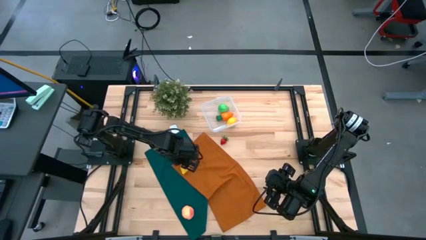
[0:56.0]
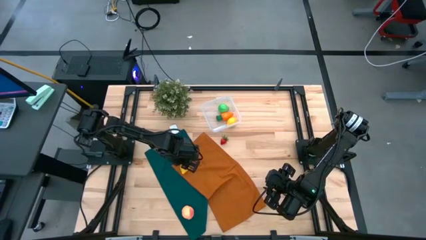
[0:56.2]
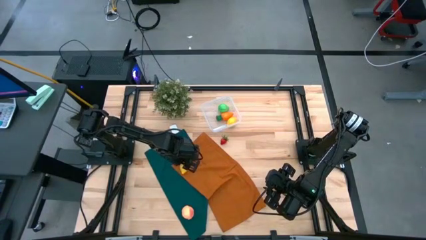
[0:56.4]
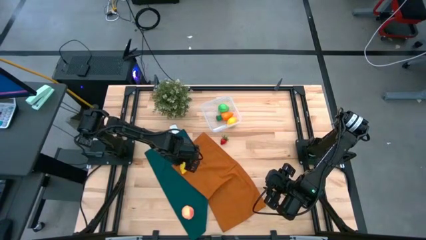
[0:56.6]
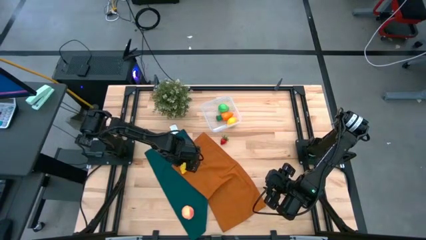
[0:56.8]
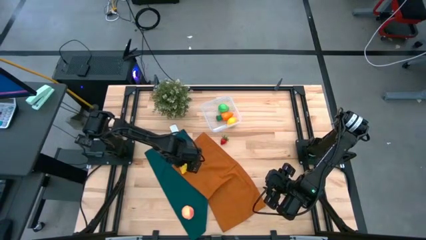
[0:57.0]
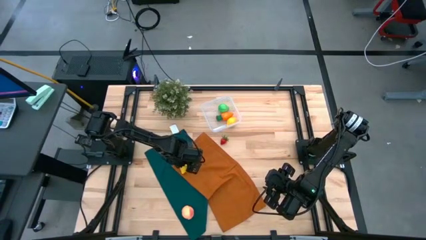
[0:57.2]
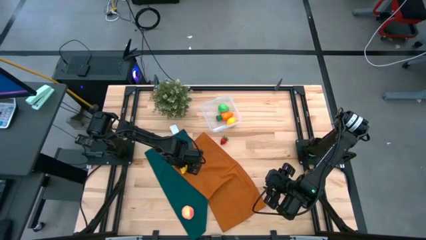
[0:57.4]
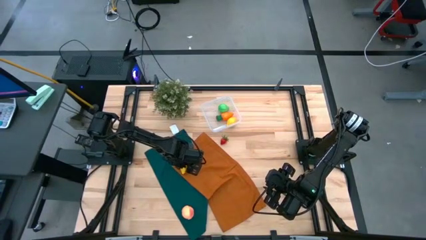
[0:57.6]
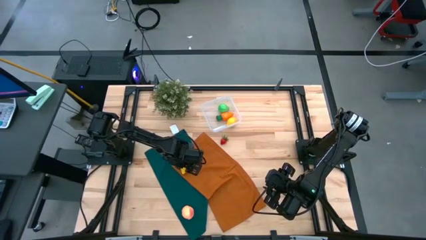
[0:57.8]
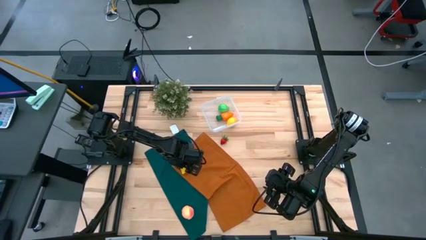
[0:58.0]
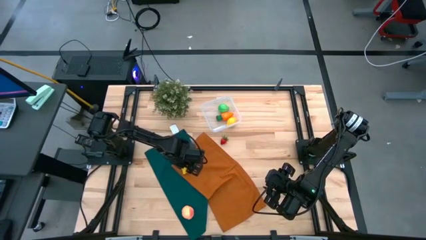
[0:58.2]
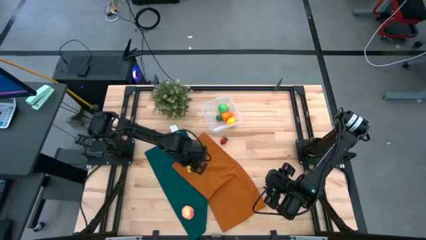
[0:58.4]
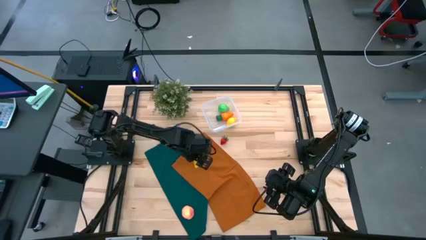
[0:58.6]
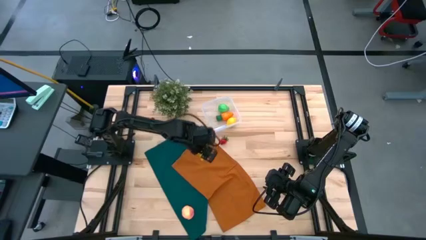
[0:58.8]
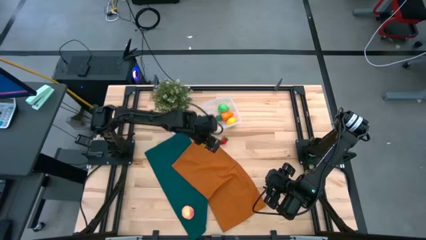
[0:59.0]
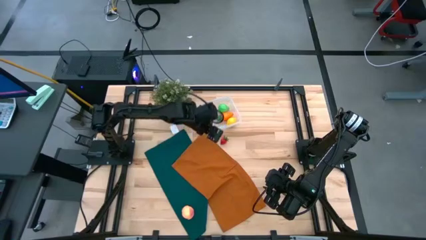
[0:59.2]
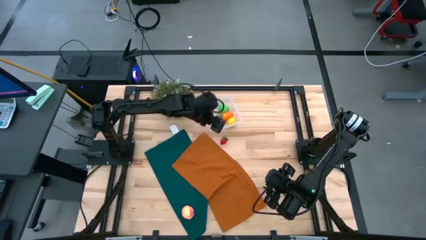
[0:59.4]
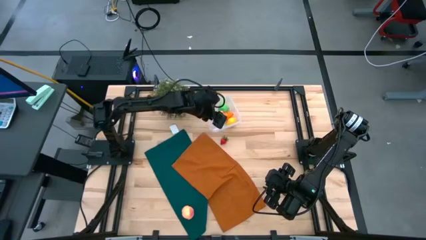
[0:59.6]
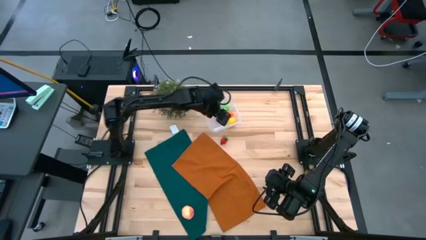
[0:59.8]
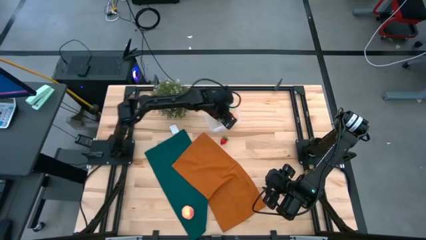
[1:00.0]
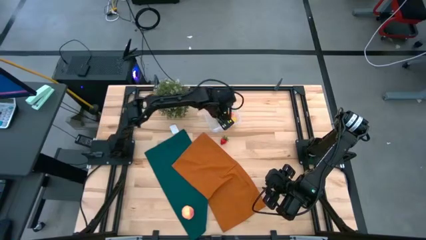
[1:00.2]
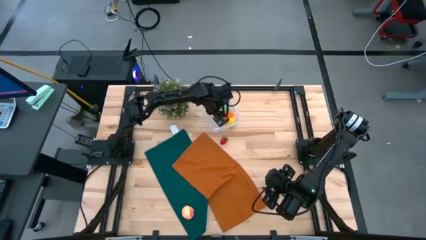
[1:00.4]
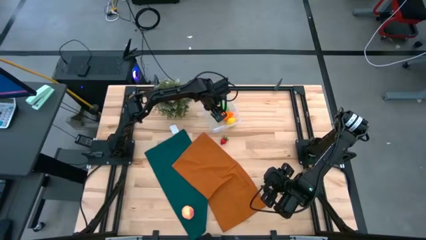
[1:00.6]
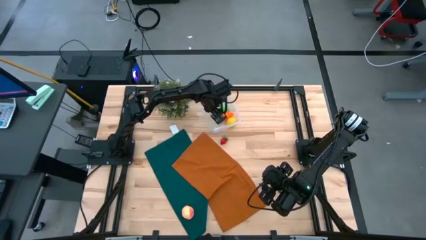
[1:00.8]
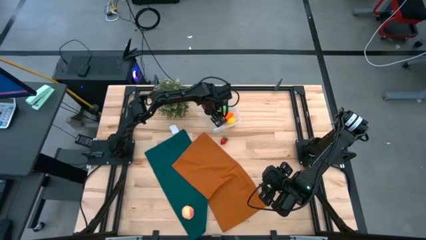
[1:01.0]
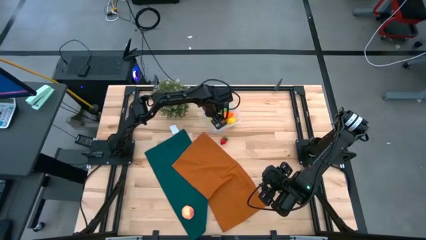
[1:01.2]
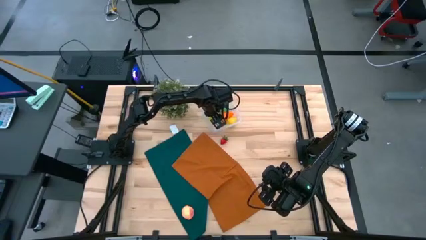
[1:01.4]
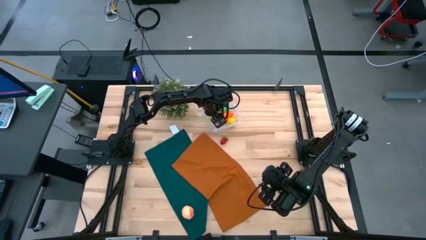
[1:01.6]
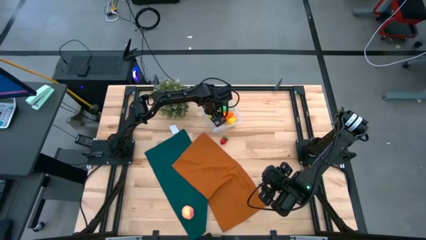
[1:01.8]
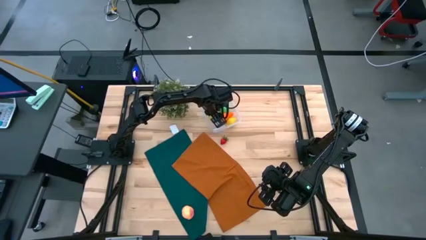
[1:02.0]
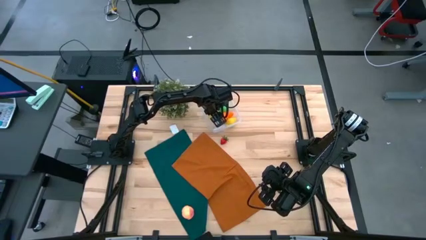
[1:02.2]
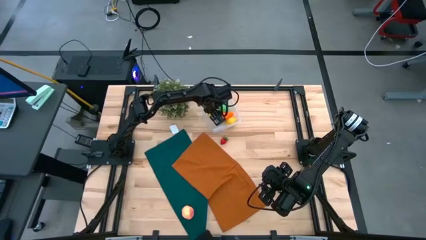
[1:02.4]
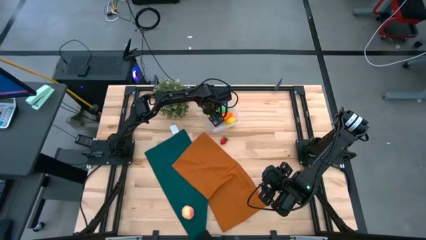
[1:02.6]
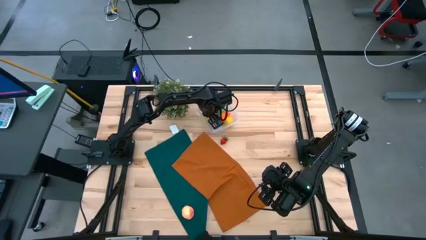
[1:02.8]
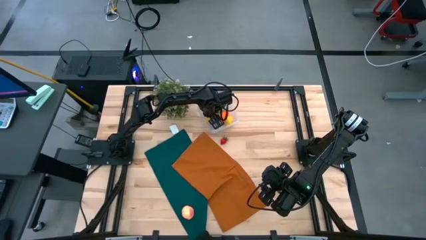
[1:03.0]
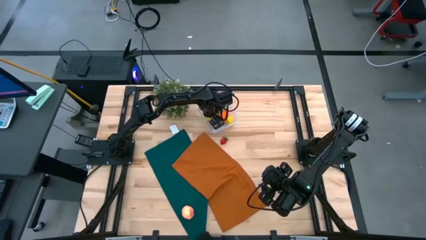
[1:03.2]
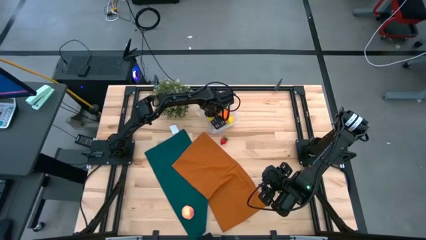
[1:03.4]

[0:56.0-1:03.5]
Task: Pick and placing Produce into tupperware
Put the yellow lemon into the transparent bin

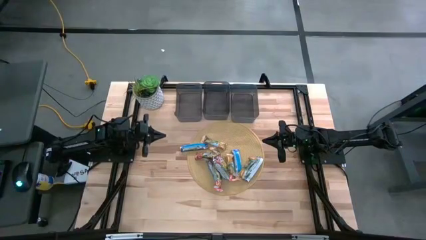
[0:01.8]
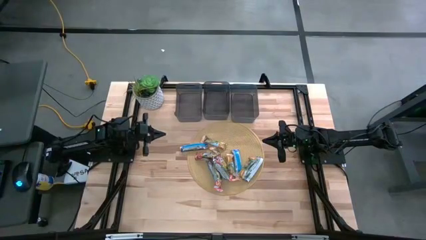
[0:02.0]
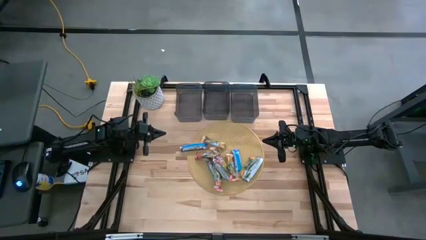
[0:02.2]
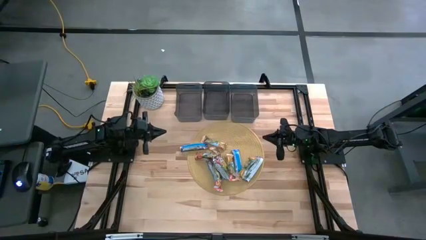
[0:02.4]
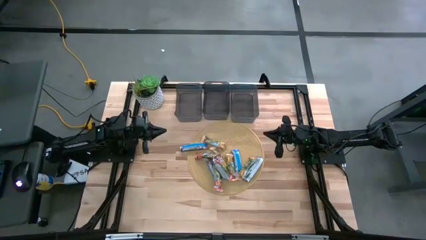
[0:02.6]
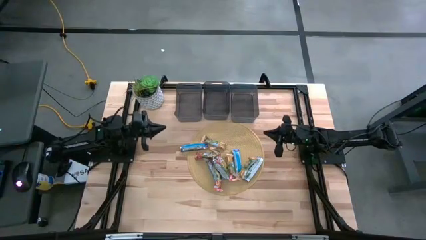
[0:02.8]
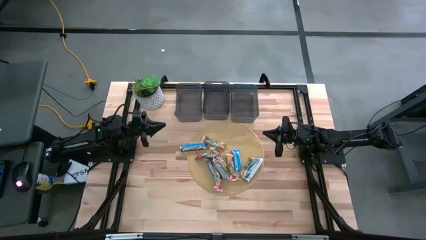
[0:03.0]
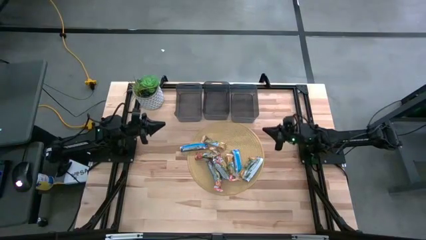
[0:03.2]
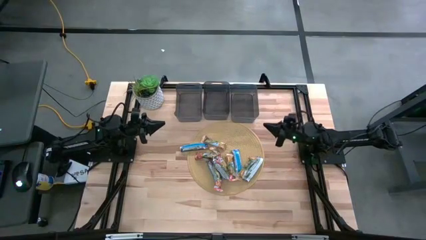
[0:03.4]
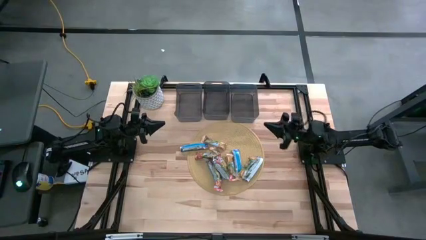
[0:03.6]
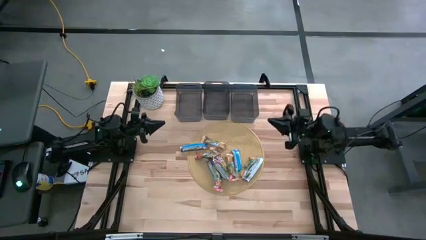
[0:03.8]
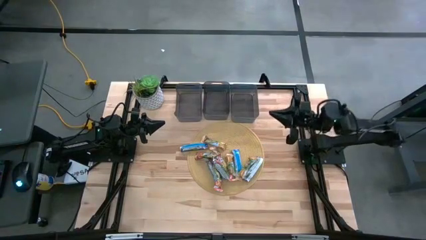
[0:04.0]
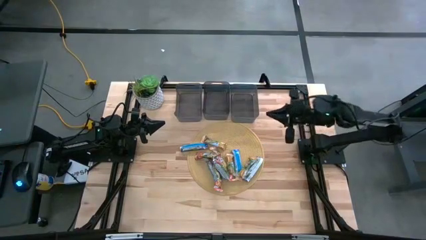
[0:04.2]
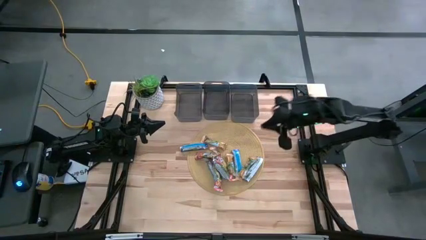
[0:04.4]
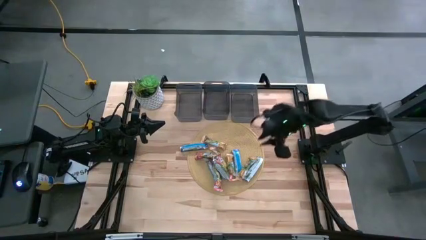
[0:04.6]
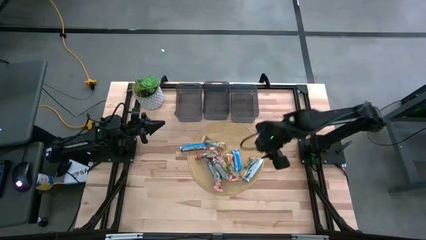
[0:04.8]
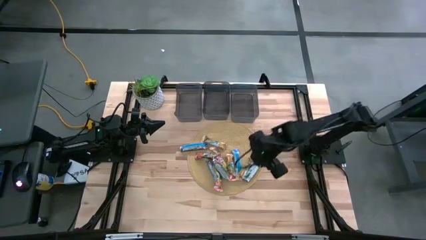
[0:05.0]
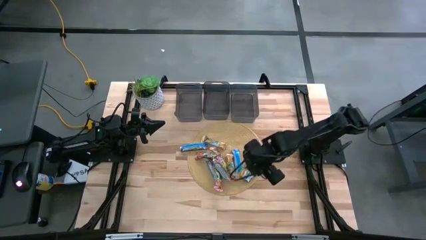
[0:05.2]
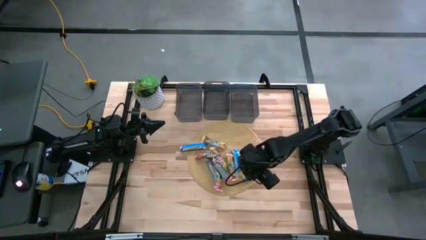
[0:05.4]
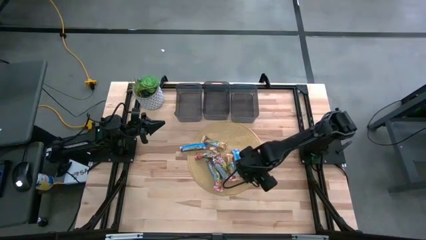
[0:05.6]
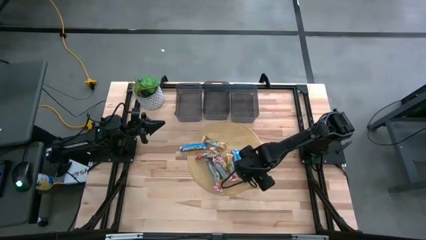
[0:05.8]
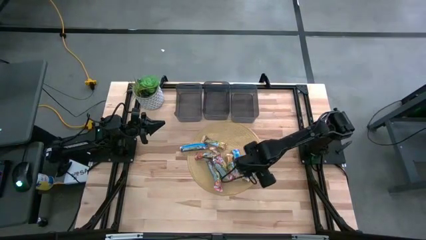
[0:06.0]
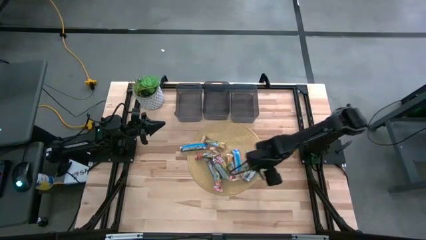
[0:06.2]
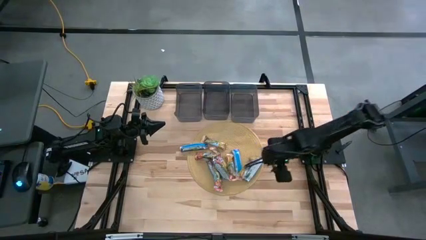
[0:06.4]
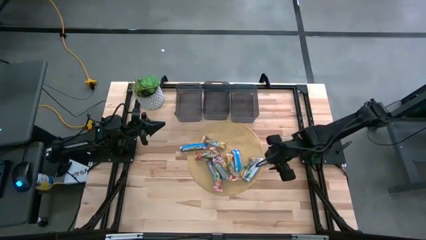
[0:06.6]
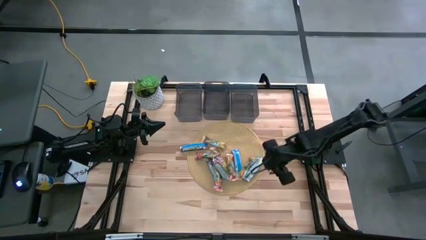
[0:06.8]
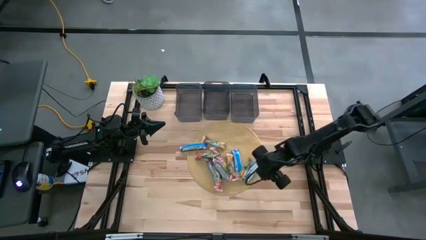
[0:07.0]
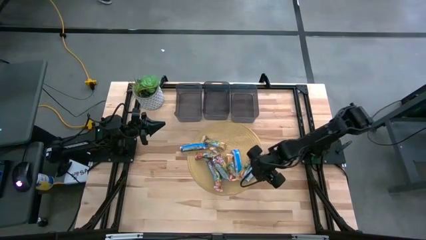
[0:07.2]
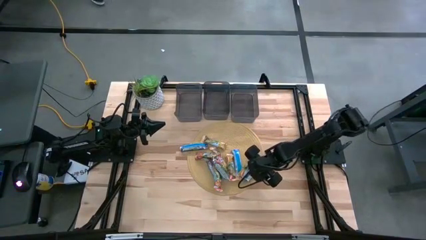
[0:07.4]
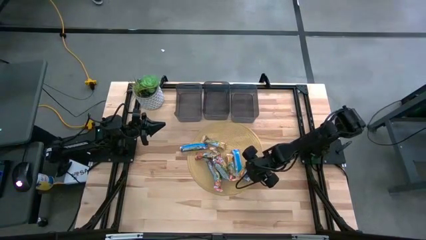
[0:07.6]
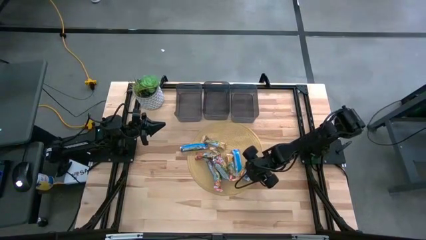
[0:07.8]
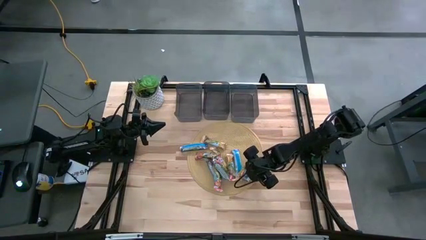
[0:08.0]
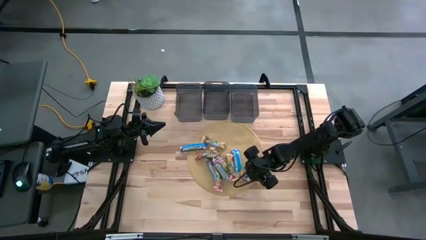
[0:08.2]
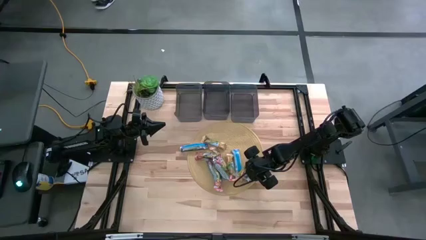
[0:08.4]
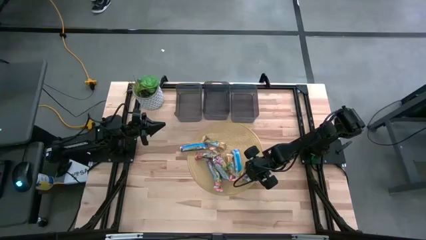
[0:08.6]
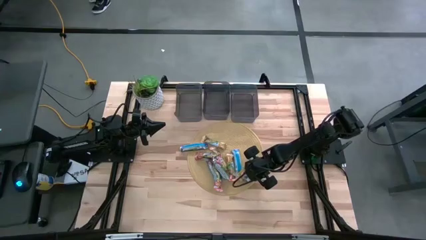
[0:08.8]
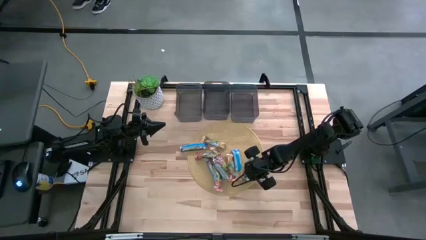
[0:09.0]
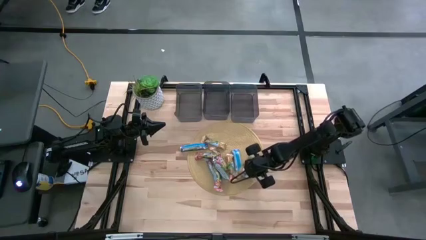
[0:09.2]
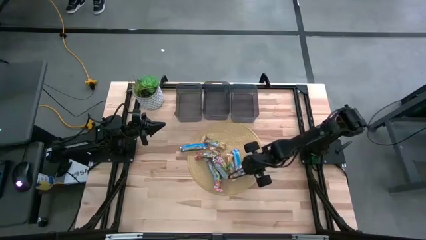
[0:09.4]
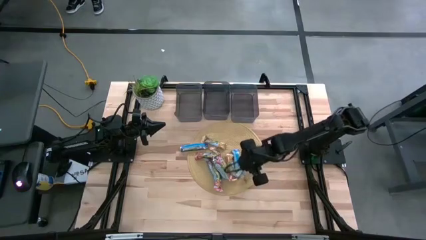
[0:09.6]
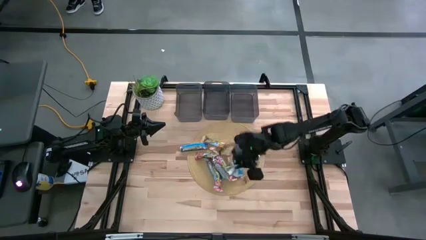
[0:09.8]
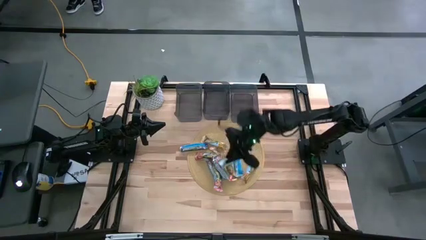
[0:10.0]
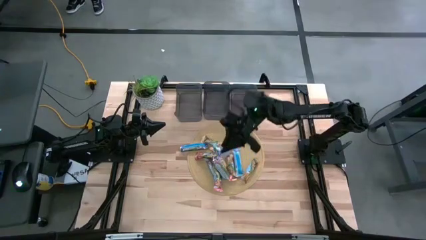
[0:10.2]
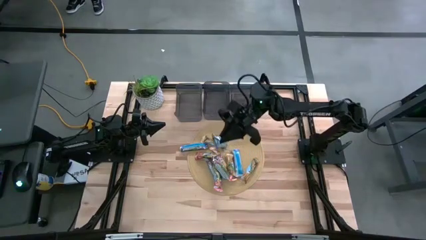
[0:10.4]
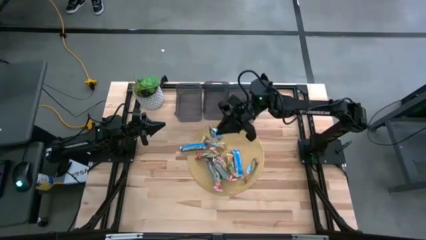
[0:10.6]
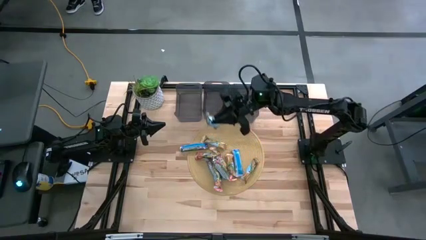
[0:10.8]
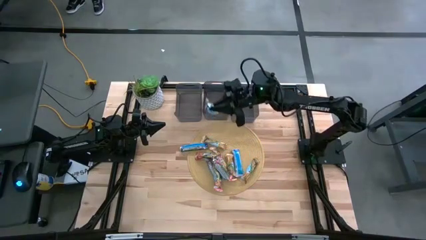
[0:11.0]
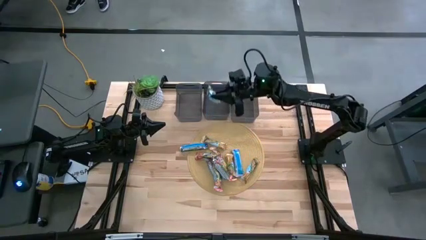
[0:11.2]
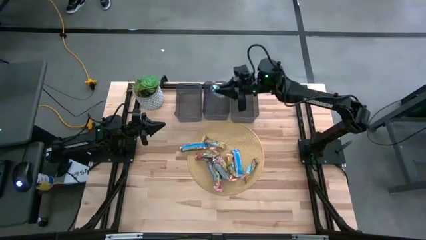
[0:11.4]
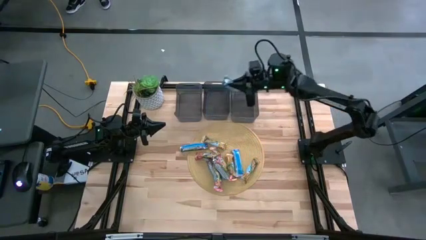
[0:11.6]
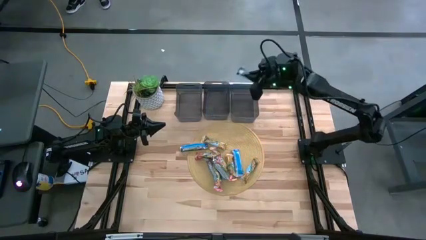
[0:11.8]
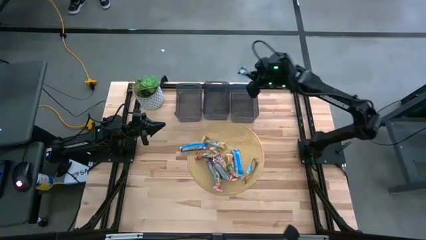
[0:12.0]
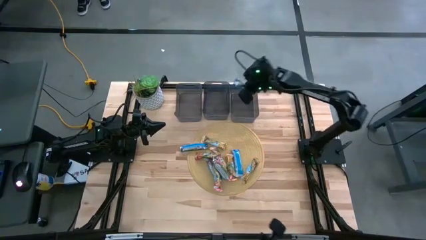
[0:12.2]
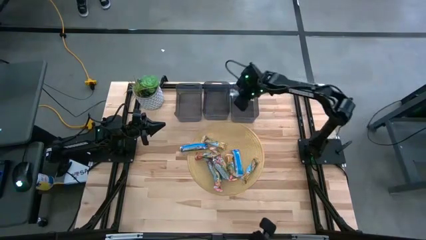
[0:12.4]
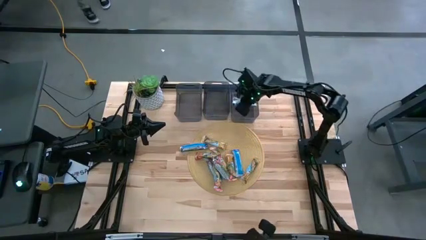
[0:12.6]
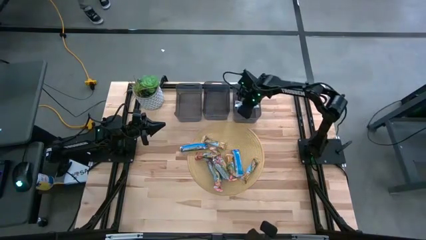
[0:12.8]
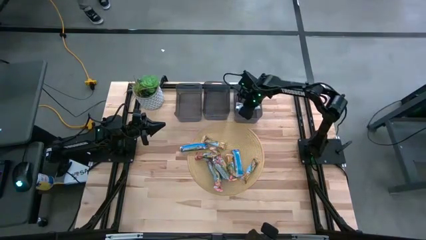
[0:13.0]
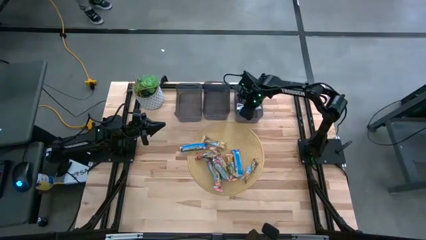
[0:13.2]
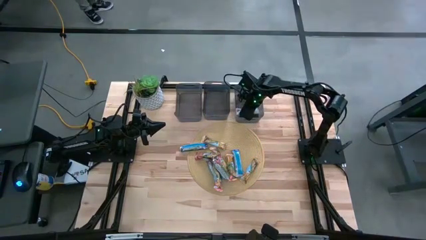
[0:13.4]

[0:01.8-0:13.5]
Task: Pick and place Granola Bars by type
Put the blue granola bar into the right black bin
